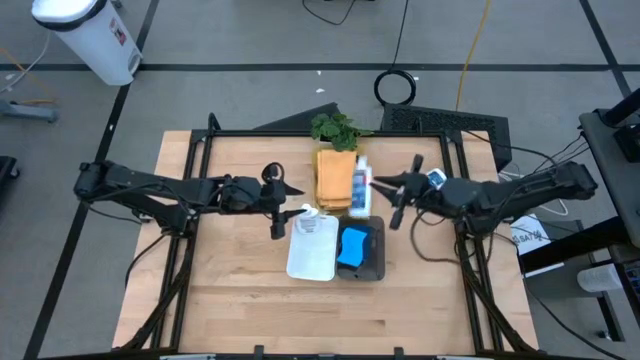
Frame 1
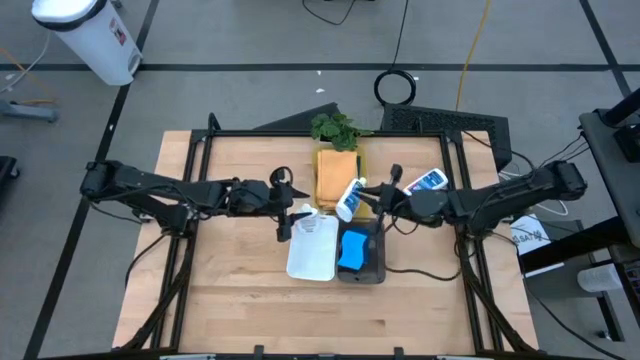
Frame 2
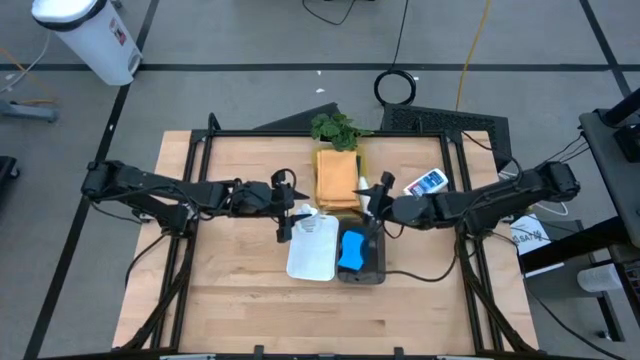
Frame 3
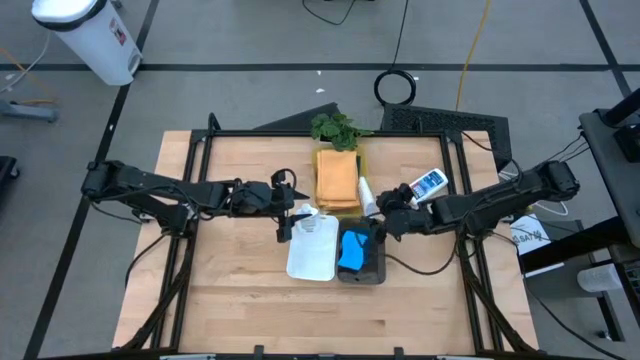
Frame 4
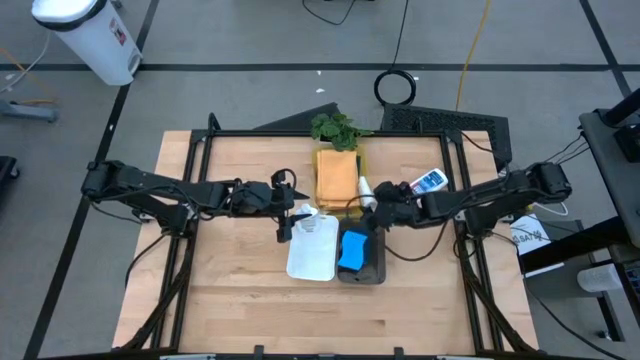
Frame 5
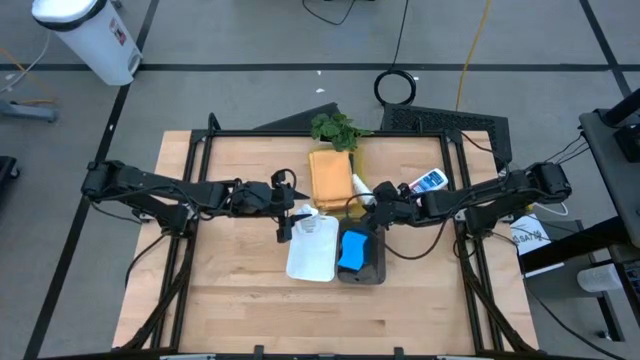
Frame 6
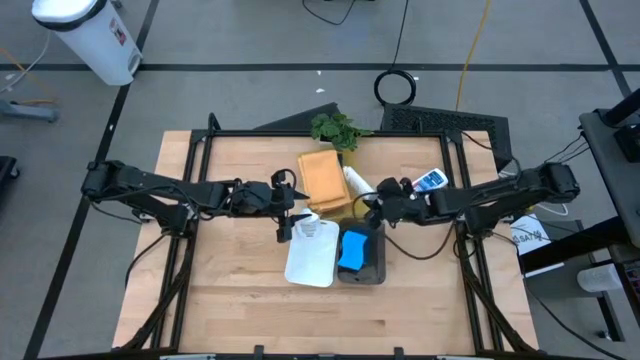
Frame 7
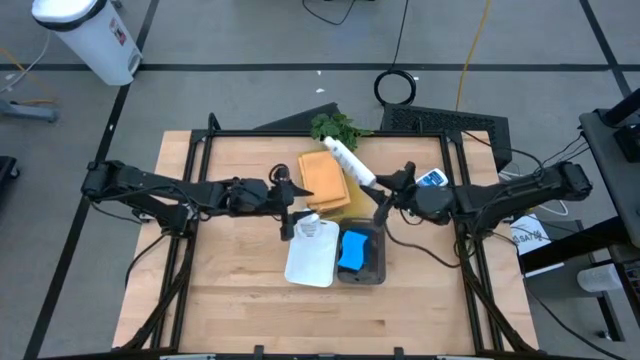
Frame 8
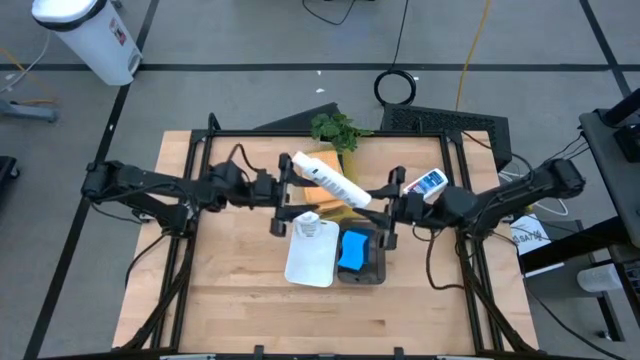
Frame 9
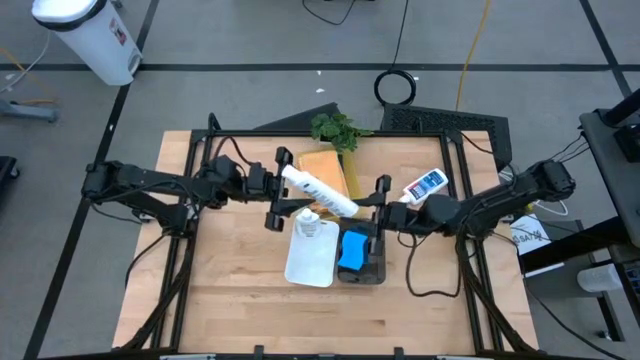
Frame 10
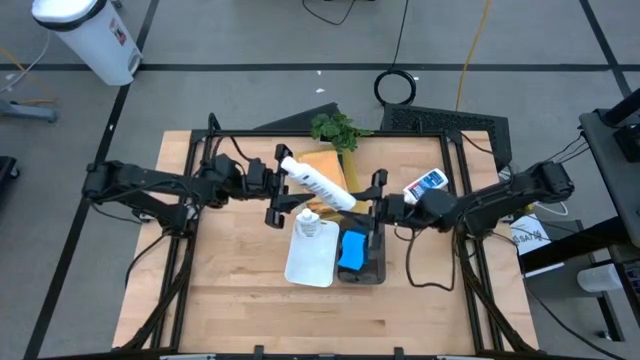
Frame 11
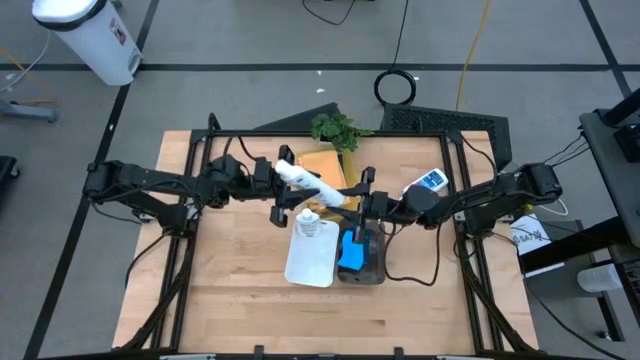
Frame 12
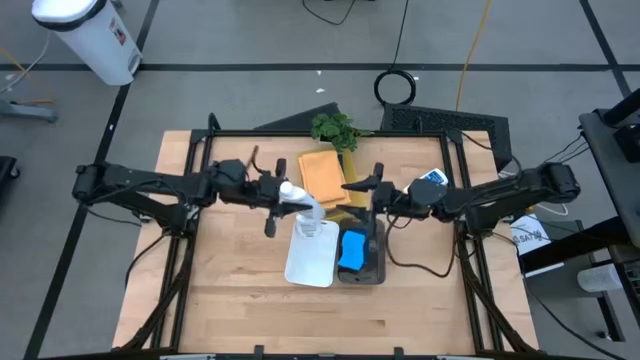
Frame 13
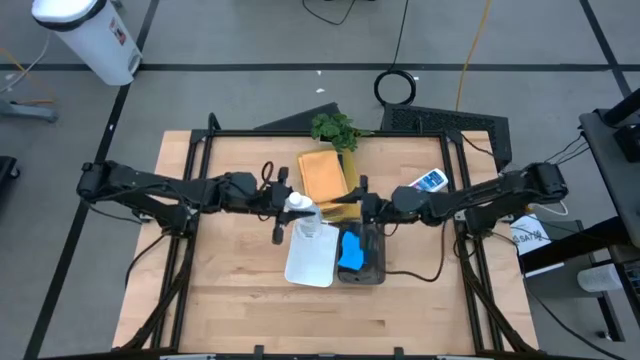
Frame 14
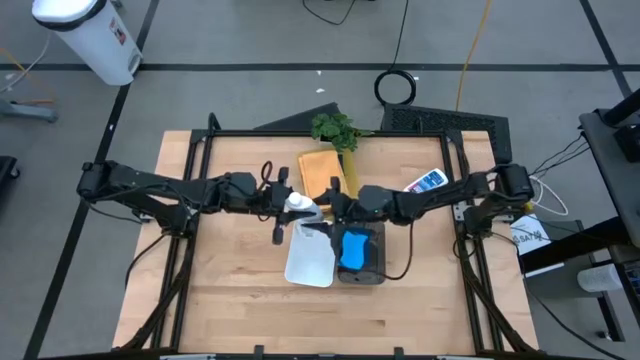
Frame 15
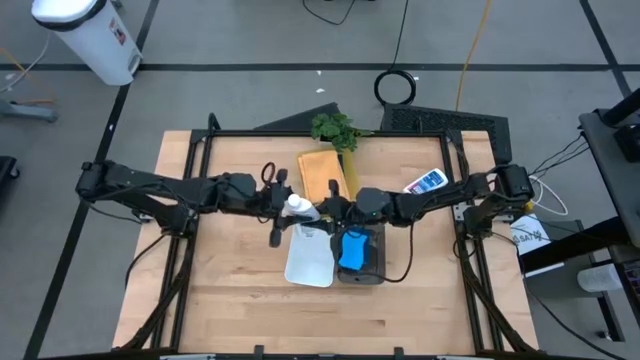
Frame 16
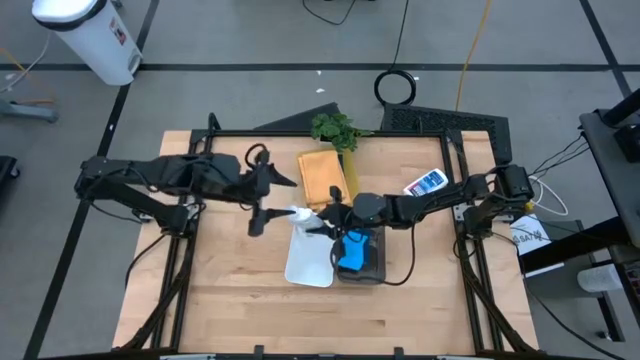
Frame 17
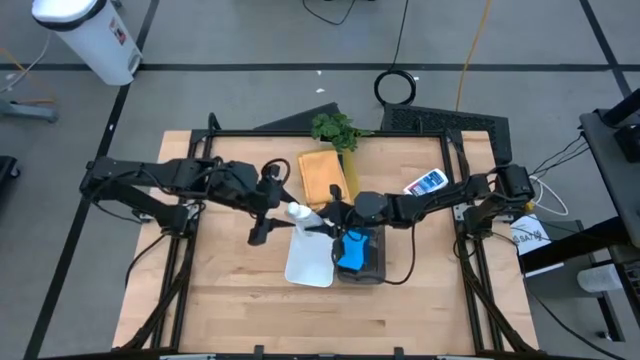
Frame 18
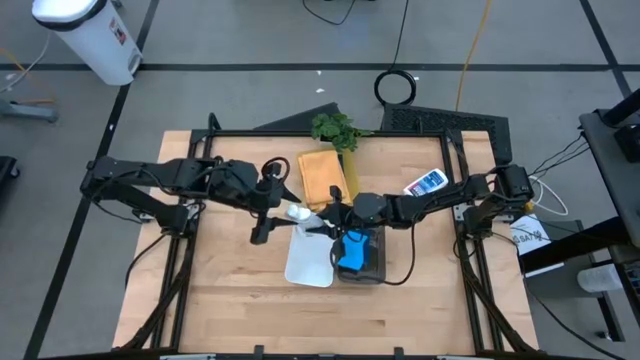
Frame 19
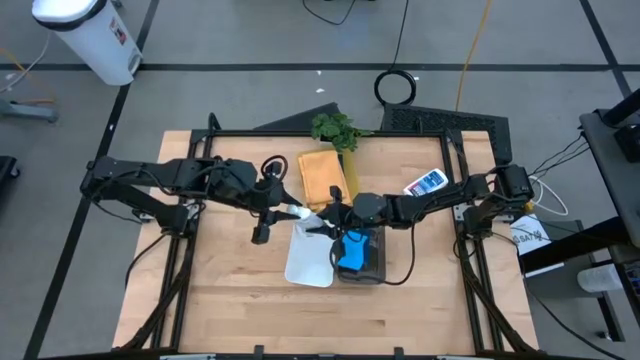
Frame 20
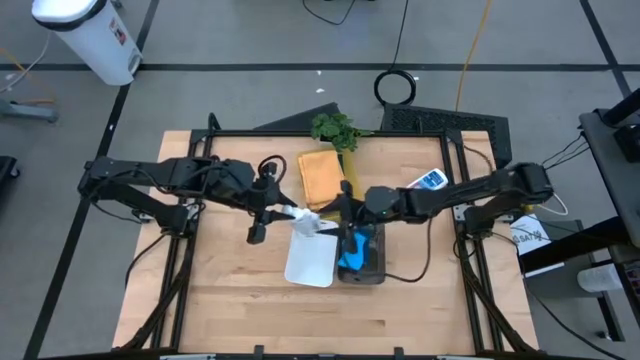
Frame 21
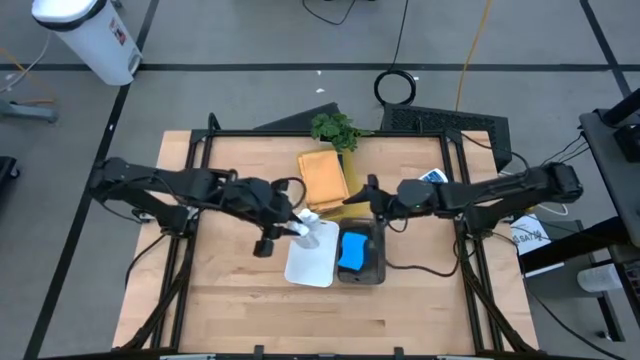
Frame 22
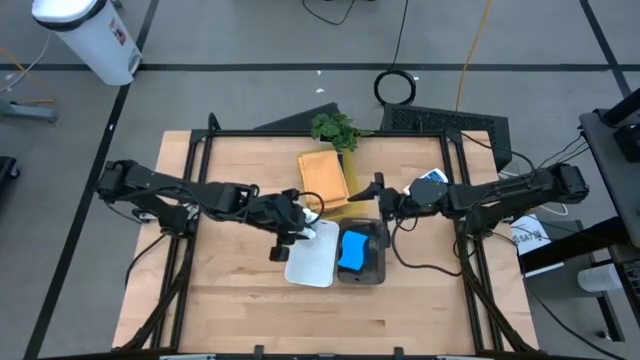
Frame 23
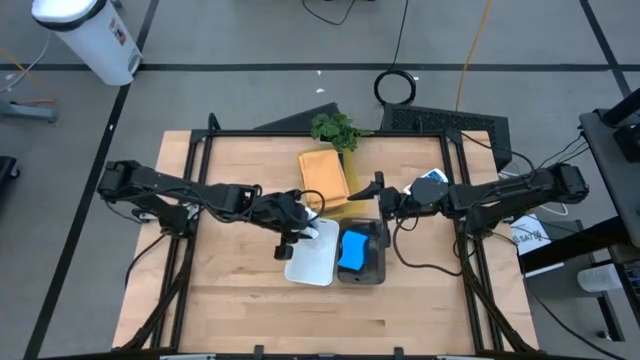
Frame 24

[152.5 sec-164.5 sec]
Task: Pick & Place Kitchen Items
Put the left plastic restorer bottle into the white bin

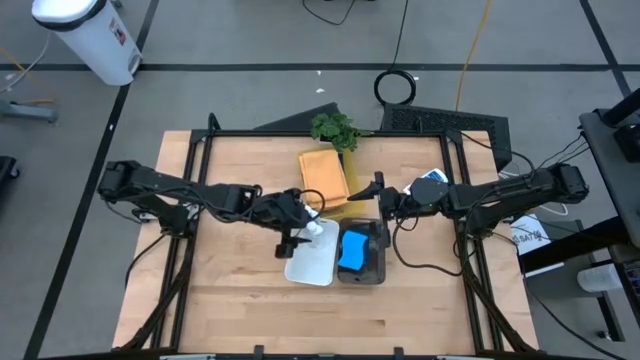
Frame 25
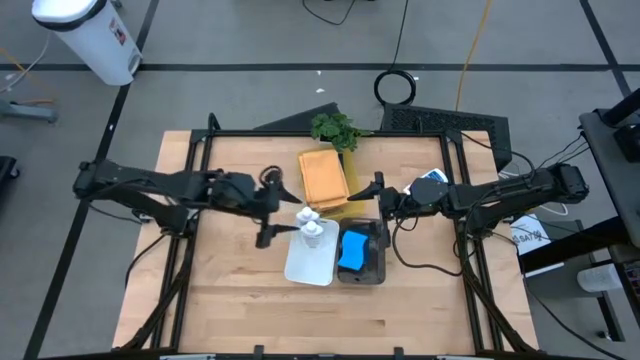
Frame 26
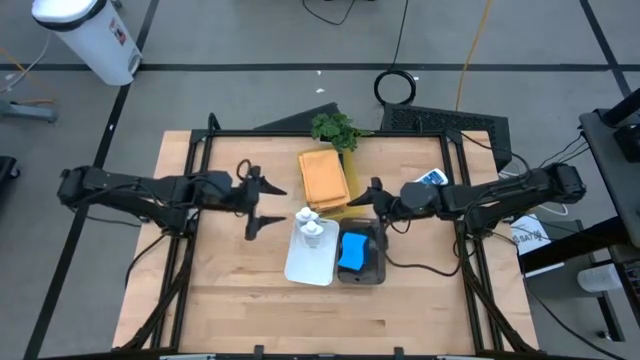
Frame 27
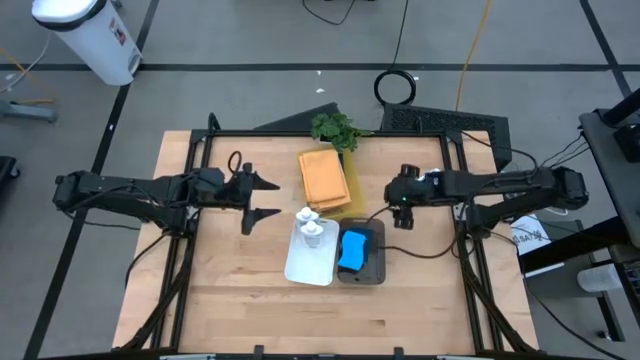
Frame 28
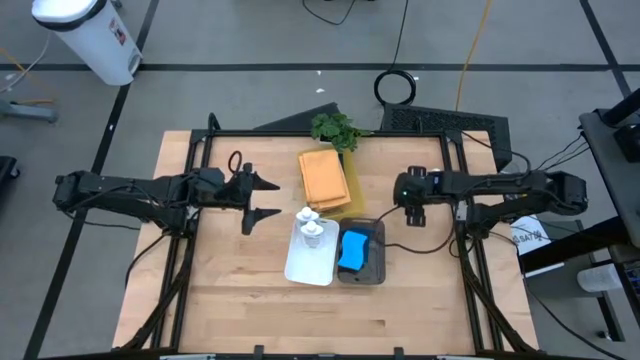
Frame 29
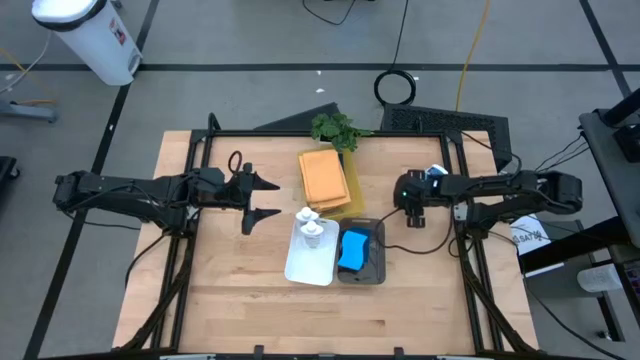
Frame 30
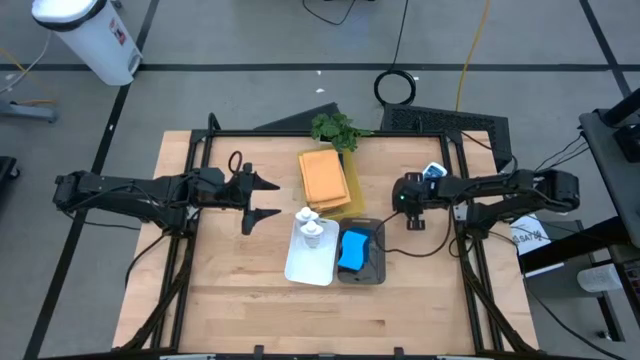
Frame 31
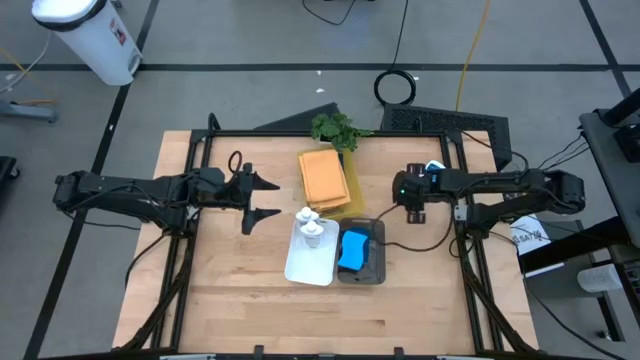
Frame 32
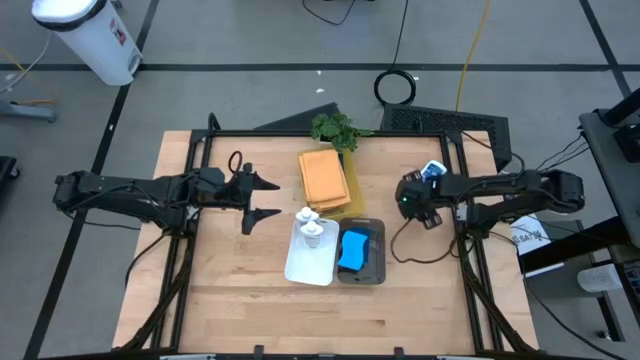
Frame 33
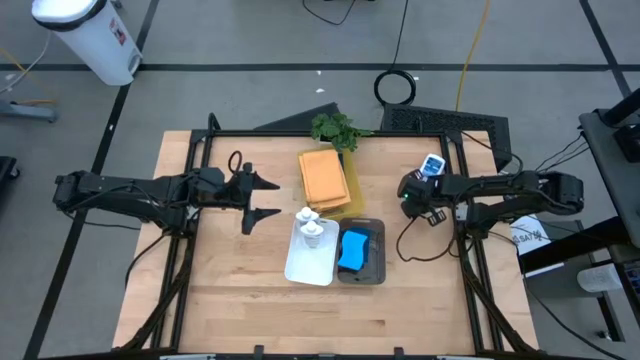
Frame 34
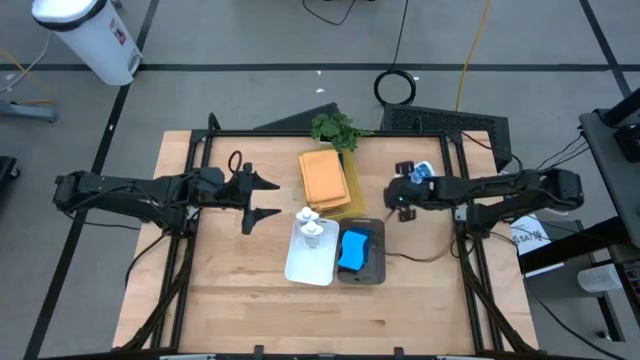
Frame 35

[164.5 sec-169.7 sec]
Put the plastic restorer bottle into the white bin

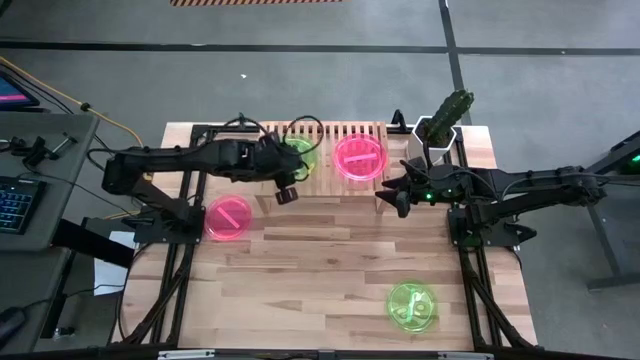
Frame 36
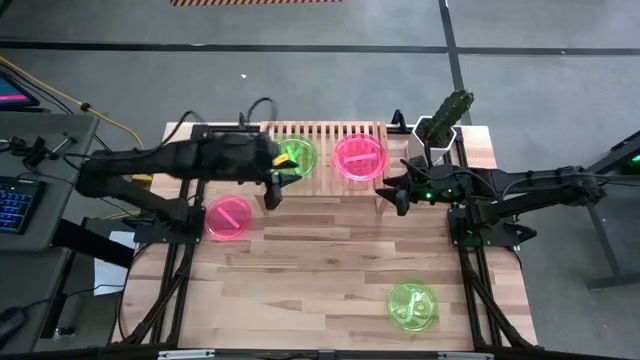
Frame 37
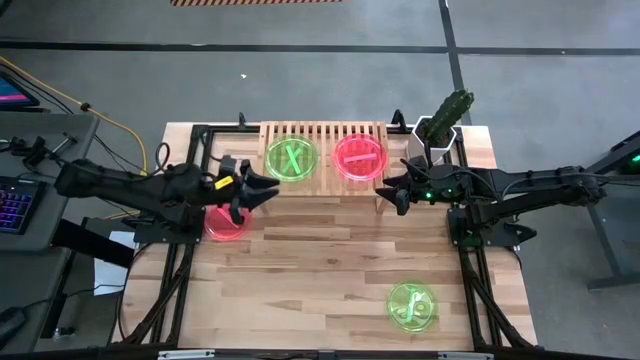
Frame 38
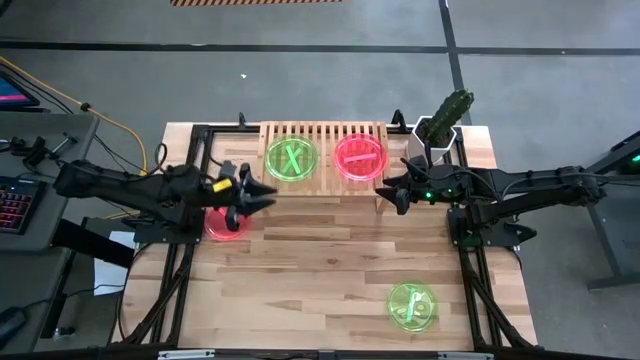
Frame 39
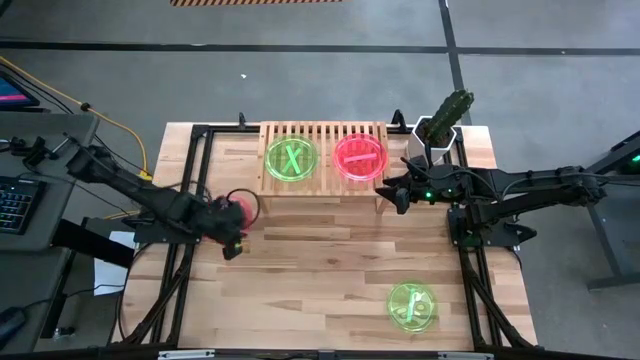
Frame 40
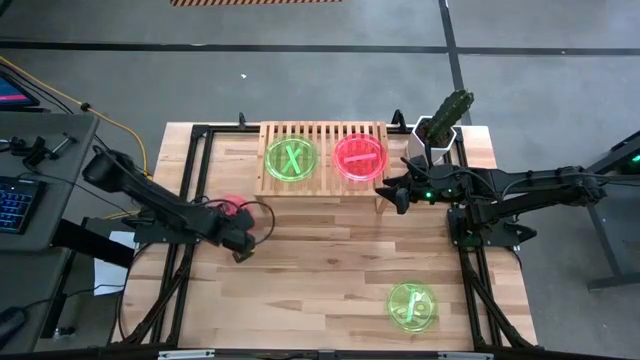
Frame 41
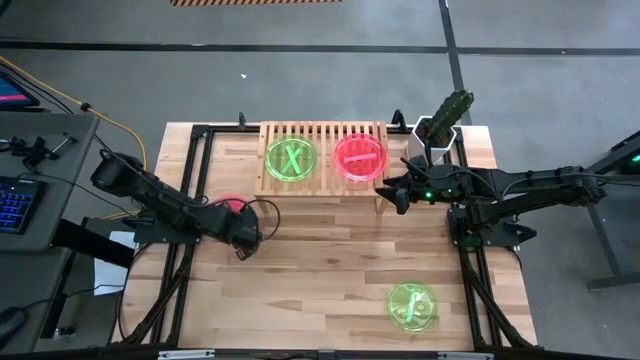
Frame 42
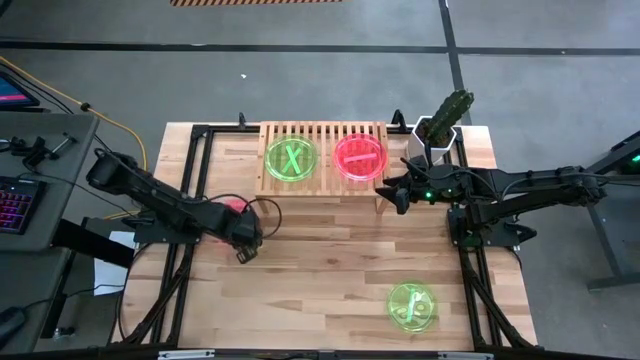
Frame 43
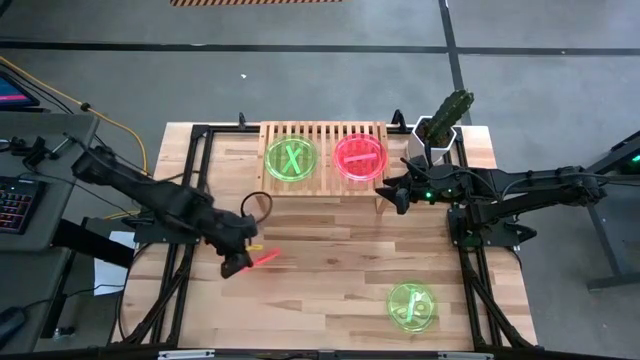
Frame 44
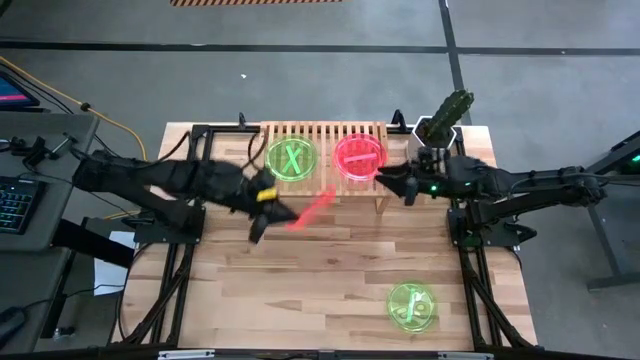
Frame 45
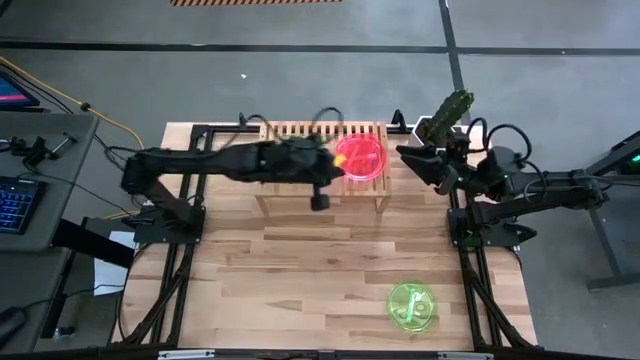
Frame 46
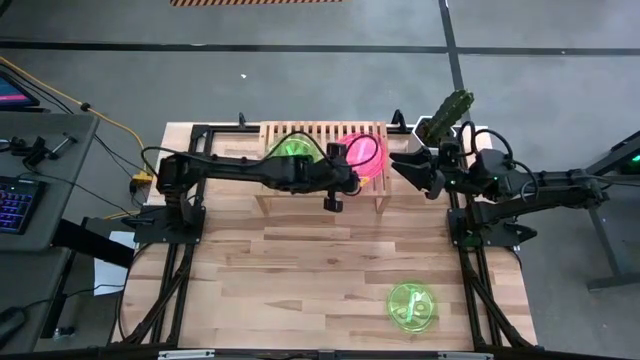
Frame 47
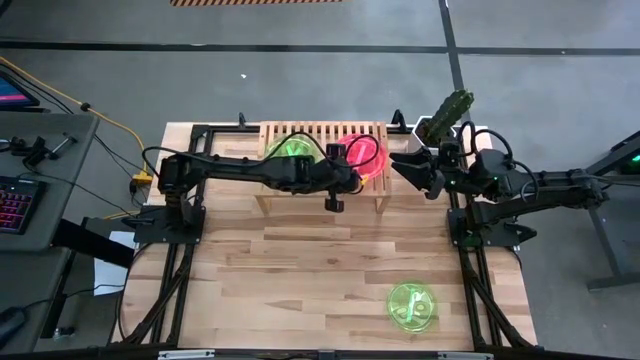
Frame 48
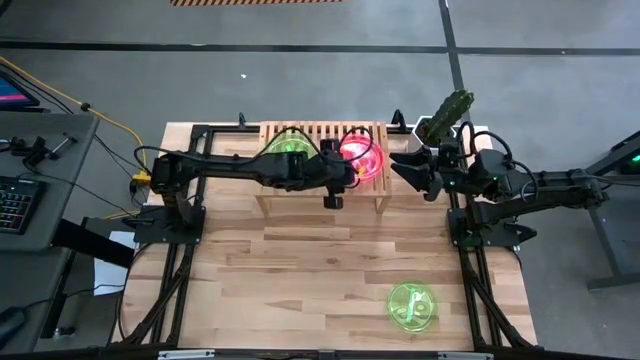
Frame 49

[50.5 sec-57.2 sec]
Task: Place and stack plates onto a shelf
Stack the pink transparent plate on the stacked pink transparent plates
